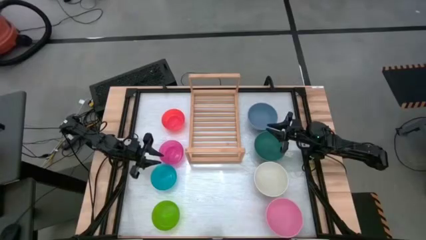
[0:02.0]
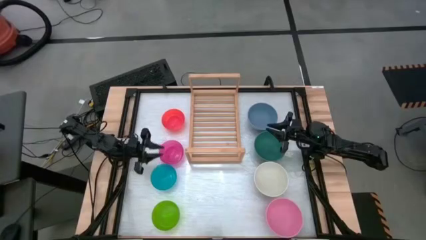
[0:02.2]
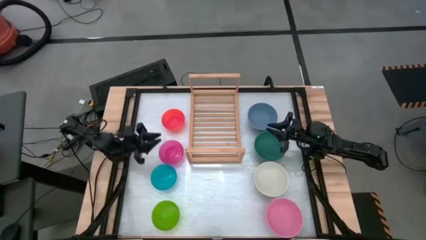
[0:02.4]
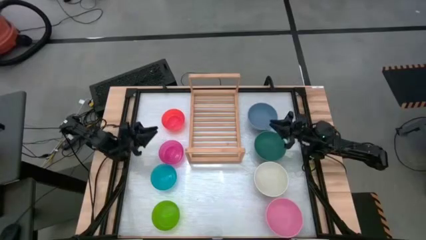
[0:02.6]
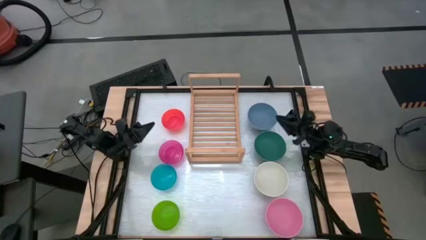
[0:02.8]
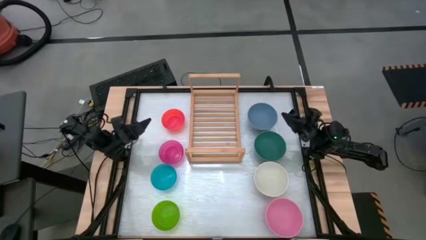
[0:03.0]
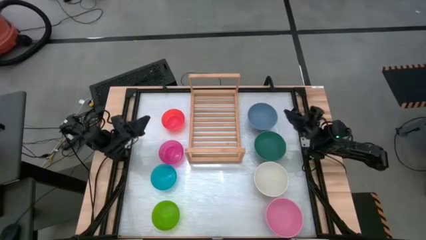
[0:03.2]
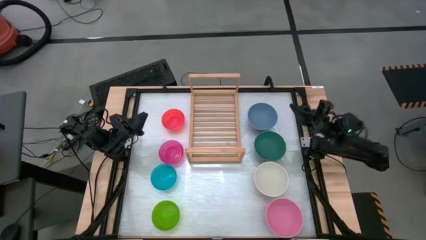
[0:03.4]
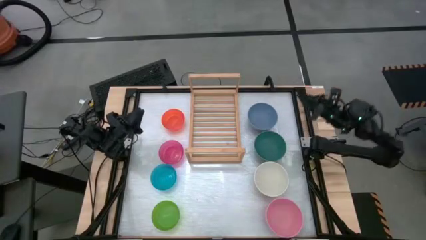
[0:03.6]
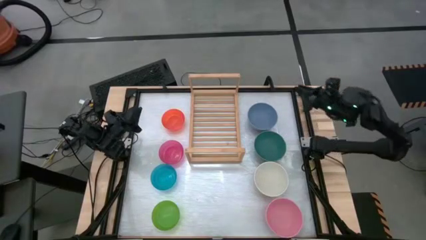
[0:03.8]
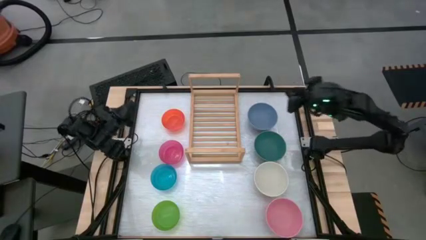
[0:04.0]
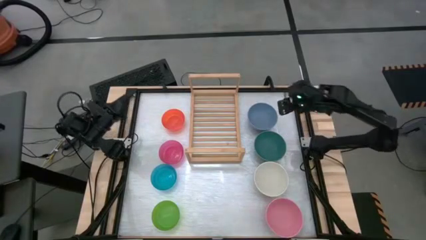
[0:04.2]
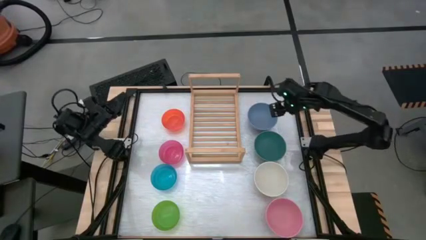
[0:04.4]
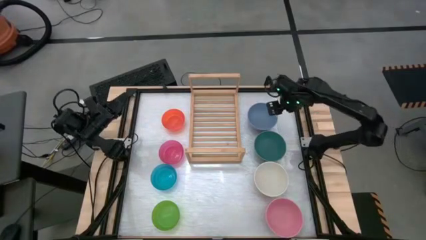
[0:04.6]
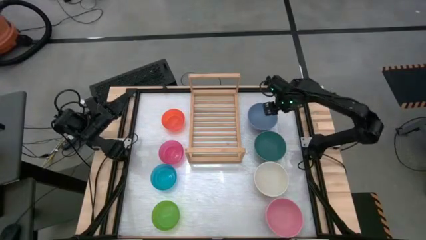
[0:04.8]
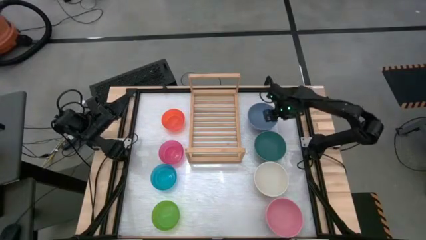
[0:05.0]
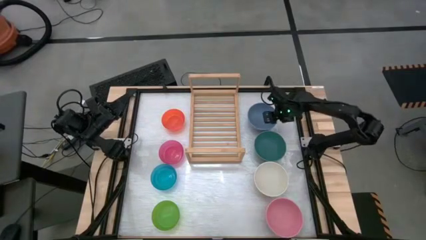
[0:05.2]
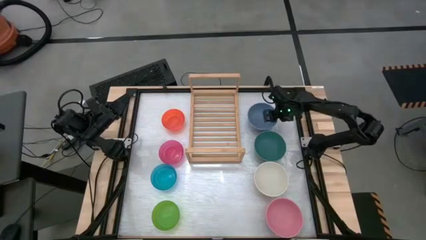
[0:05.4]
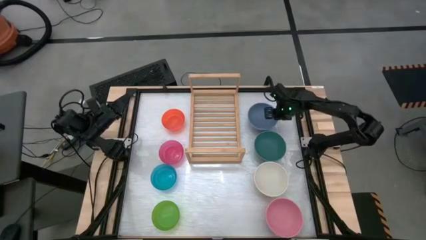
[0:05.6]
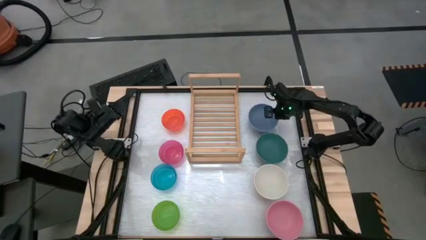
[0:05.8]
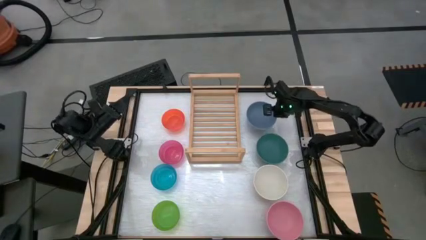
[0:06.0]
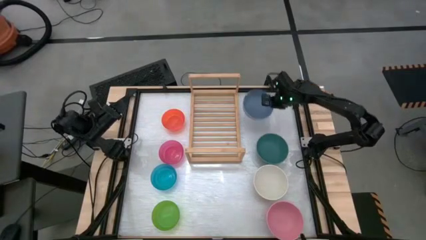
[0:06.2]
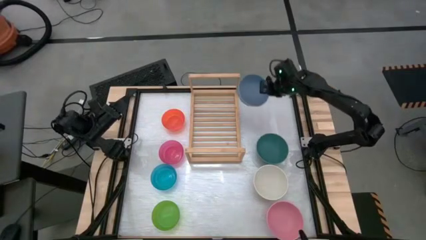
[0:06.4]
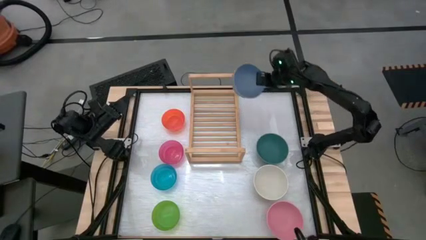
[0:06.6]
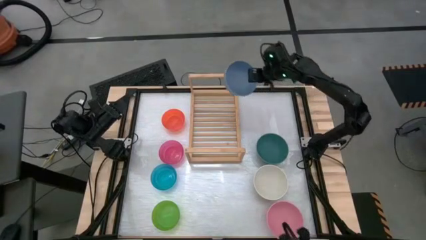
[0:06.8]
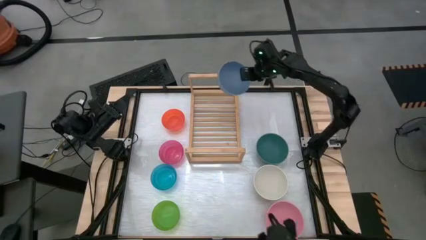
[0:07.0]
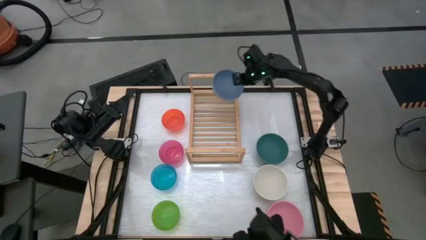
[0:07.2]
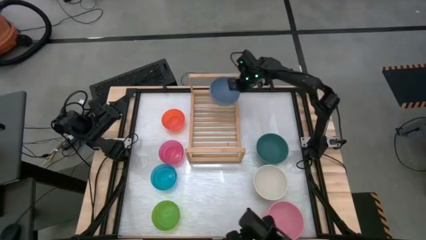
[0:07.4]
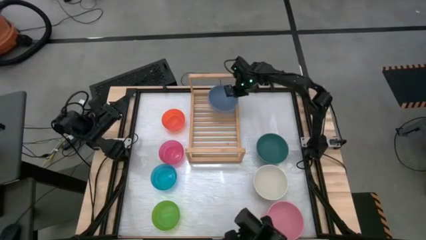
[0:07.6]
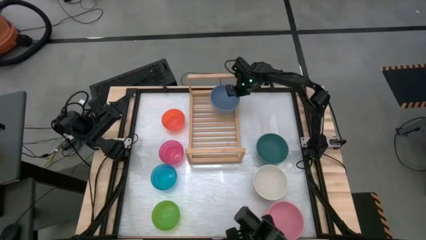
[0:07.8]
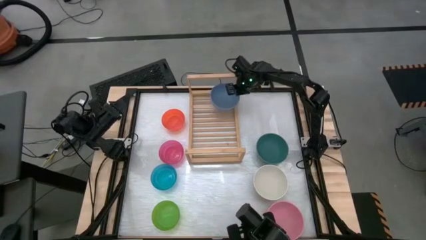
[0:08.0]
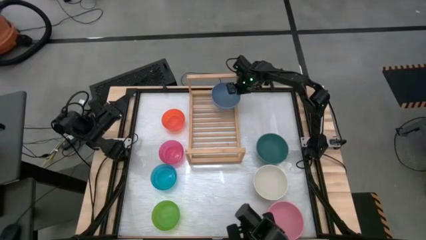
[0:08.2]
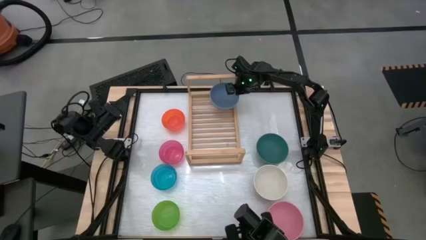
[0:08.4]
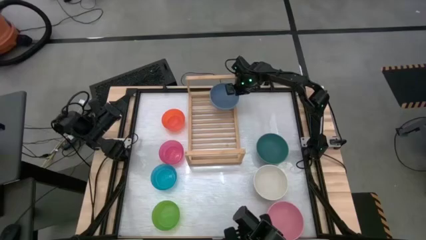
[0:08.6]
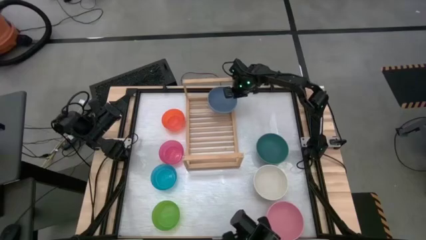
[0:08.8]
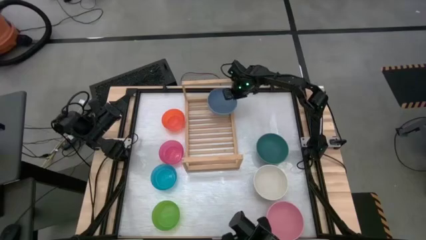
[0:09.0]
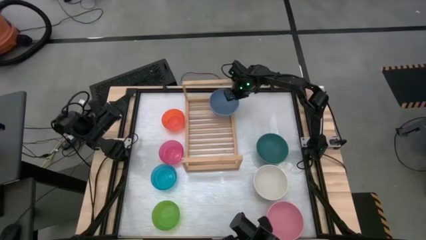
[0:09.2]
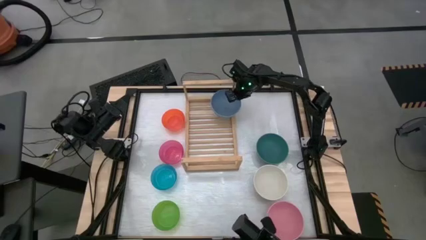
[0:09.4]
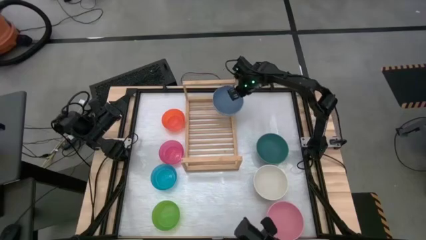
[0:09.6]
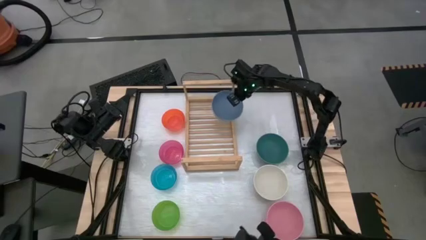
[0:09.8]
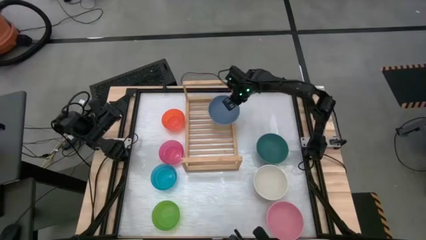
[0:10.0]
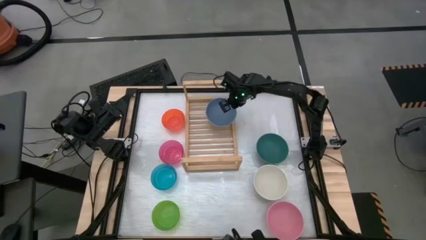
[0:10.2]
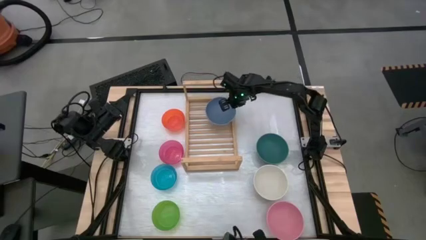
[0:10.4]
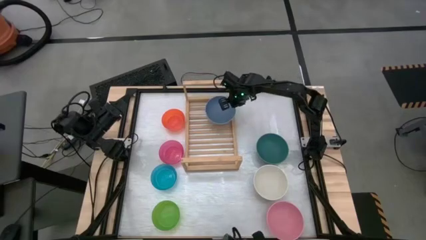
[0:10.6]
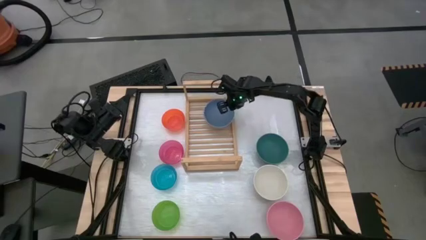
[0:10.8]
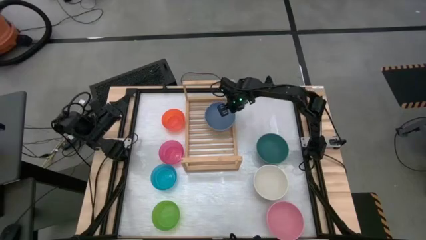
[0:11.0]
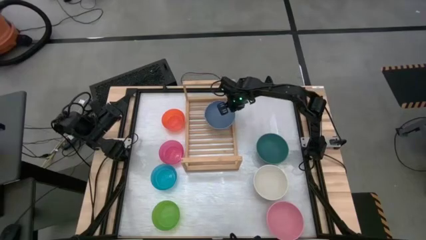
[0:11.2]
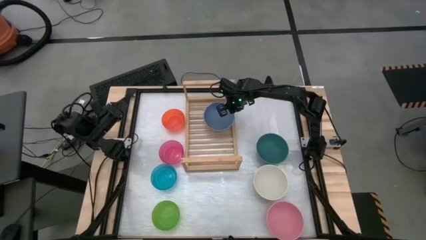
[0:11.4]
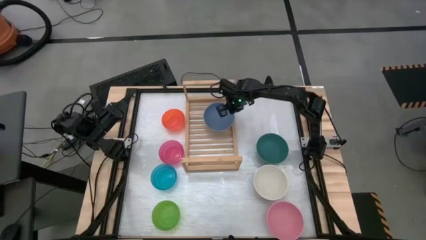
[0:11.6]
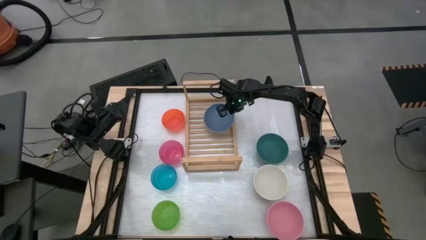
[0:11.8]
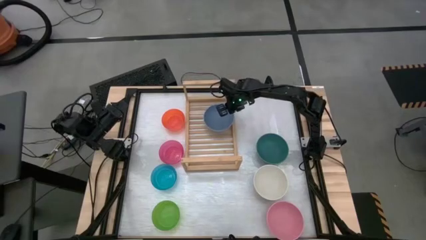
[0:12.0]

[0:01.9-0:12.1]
Task: Place and stack bowls onto a shelf
Put the right blue bowl on the shelf

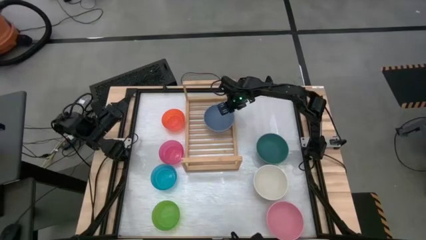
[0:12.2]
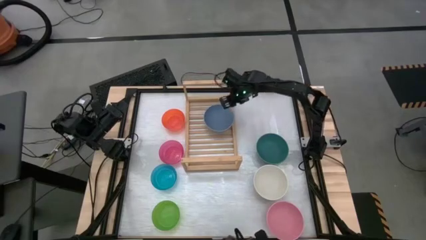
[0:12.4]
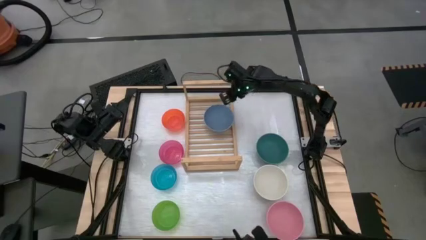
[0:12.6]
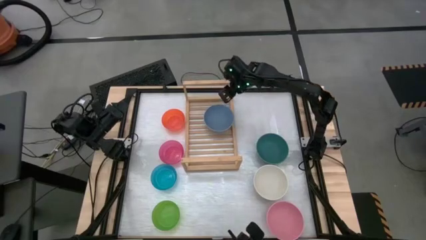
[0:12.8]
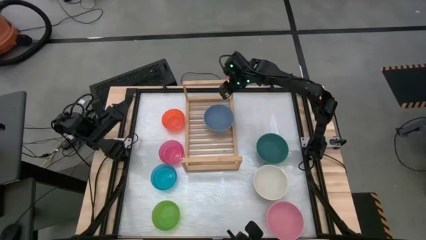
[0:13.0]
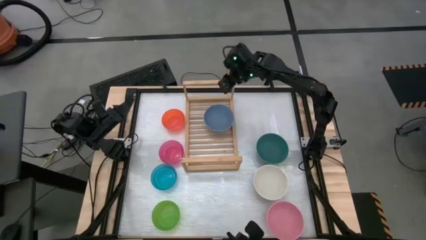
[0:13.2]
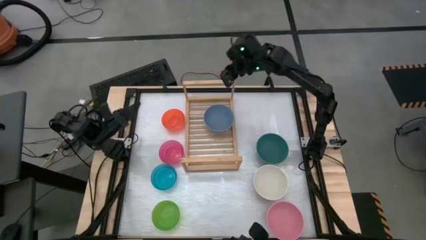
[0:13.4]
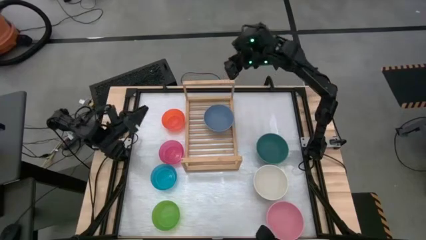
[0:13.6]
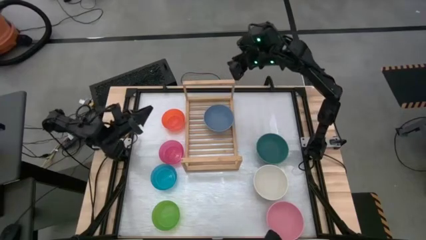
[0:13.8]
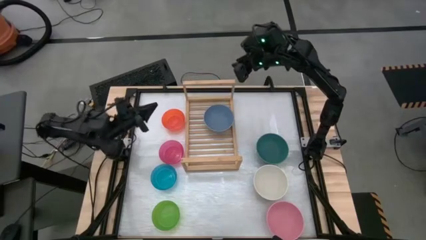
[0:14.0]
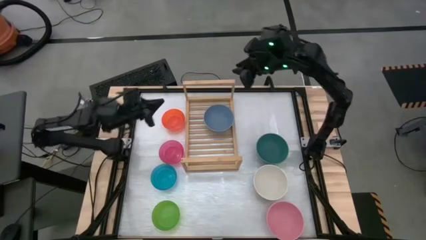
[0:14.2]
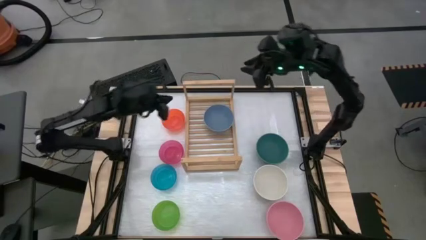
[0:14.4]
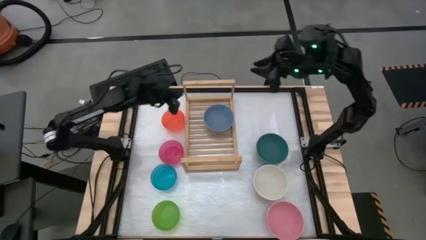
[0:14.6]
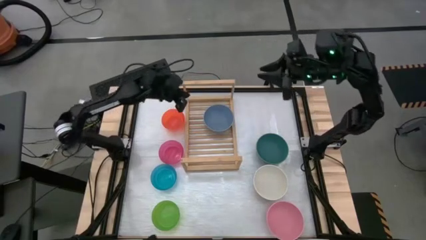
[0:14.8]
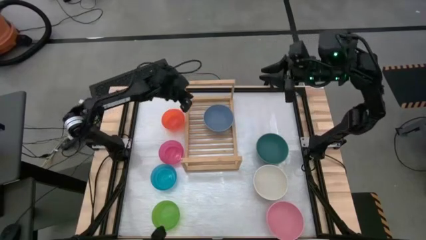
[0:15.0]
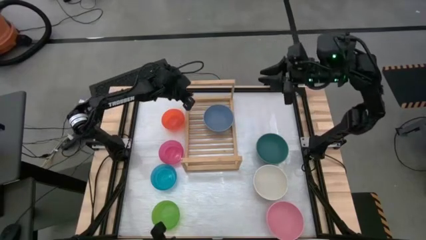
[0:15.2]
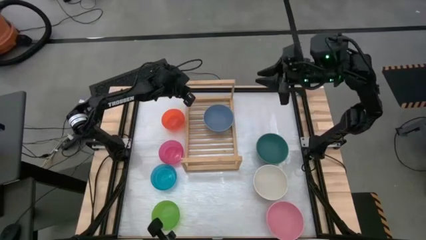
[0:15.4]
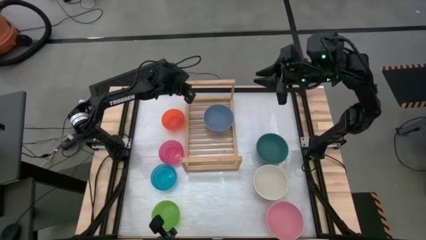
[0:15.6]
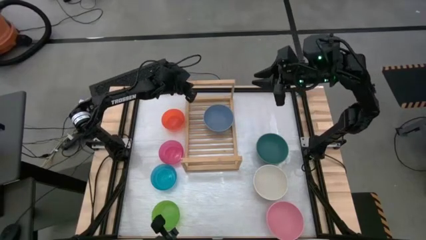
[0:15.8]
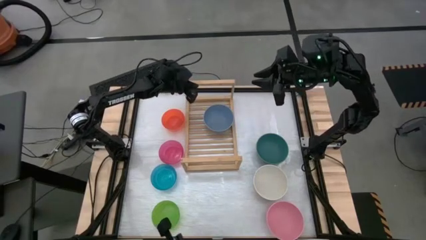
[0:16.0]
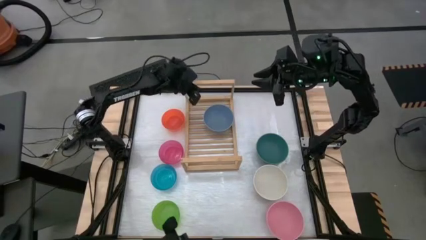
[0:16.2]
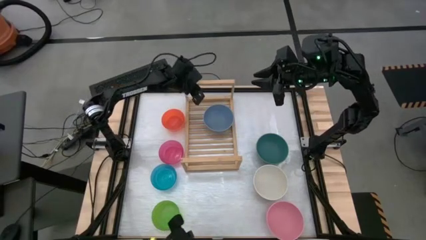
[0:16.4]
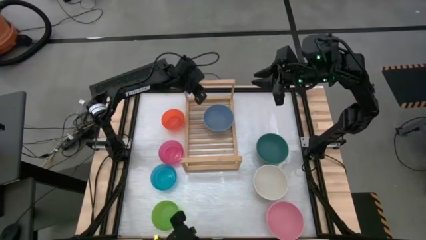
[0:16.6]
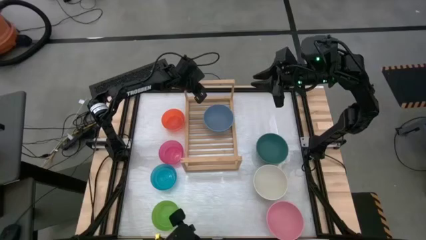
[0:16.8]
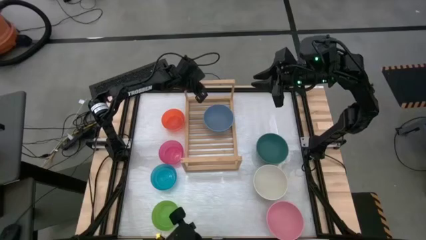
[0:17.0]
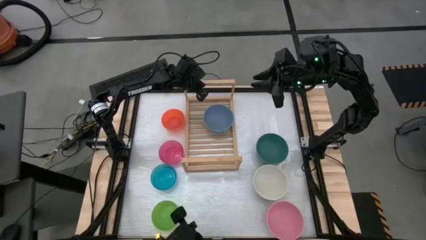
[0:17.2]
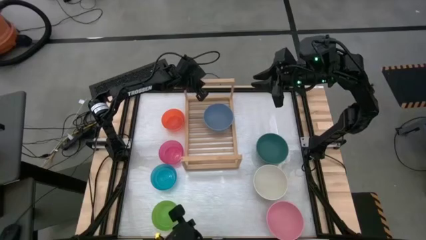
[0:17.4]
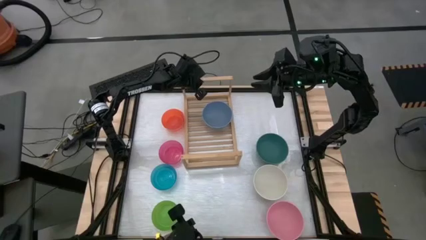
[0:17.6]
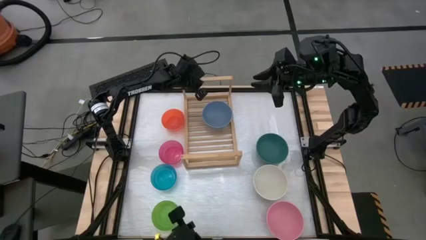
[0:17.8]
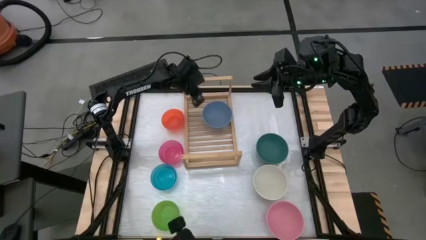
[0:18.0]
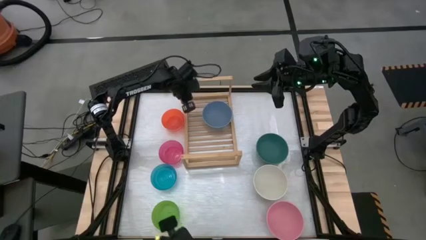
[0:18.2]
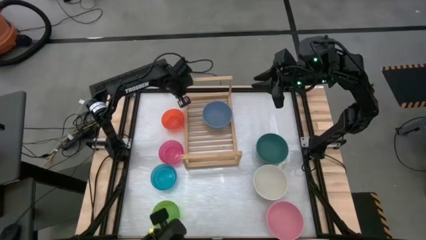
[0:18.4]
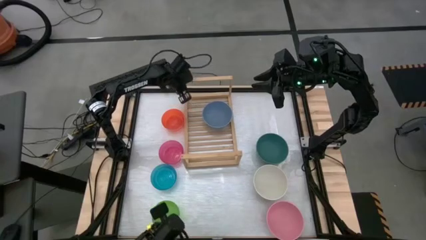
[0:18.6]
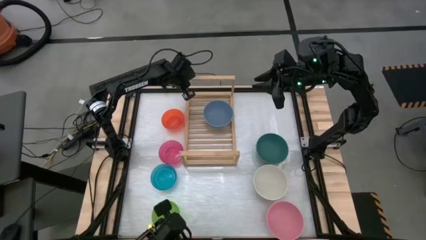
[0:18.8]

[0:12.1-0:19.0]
Adjust the shelf
